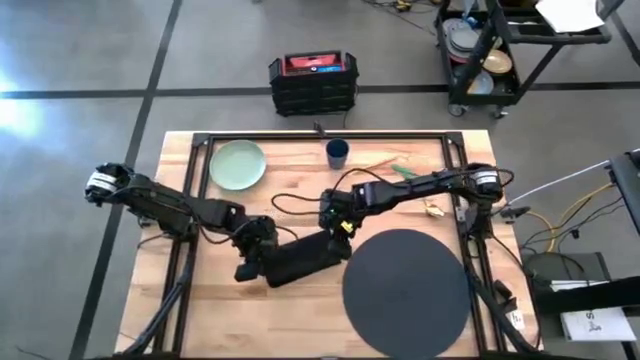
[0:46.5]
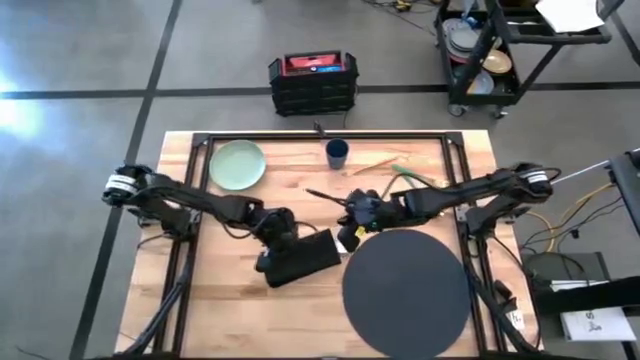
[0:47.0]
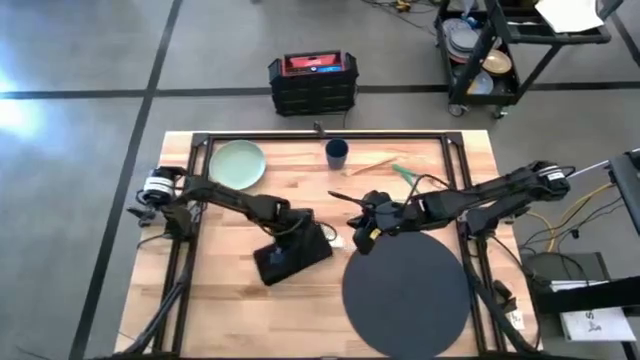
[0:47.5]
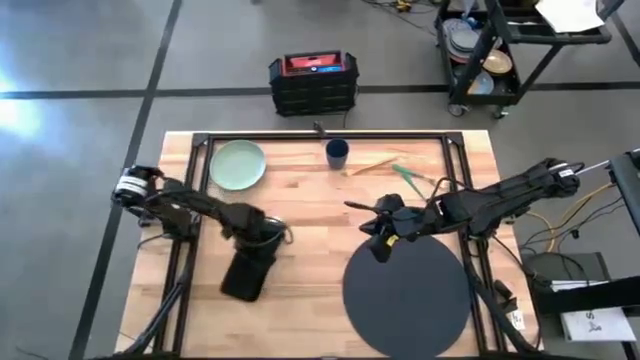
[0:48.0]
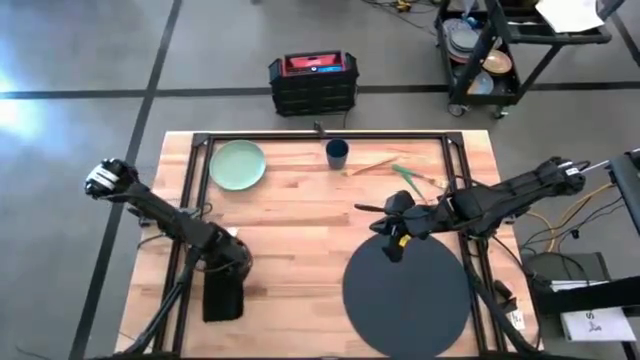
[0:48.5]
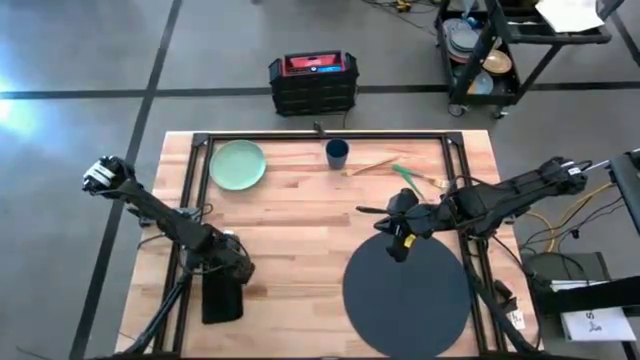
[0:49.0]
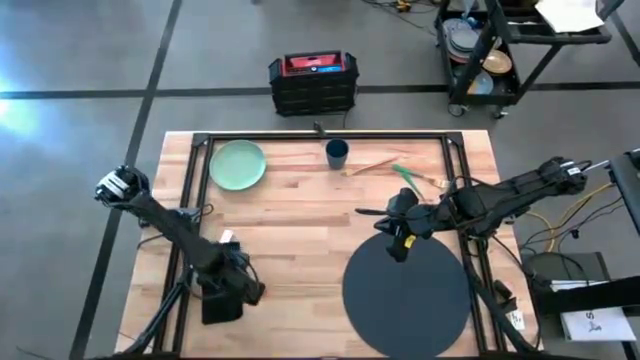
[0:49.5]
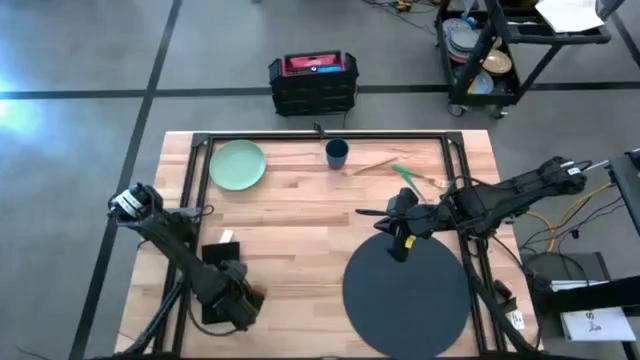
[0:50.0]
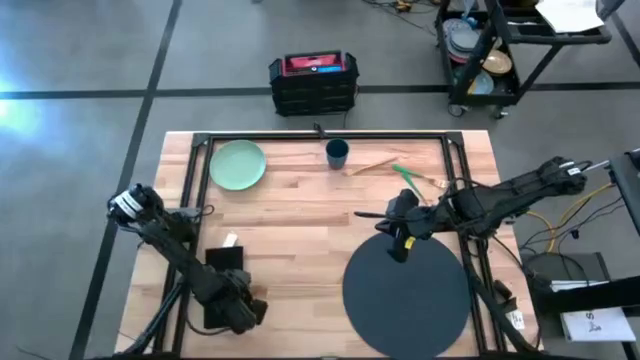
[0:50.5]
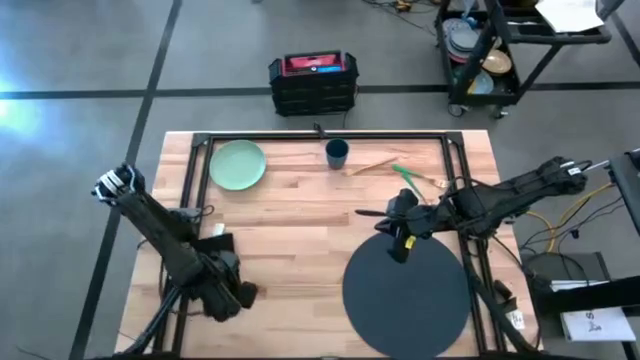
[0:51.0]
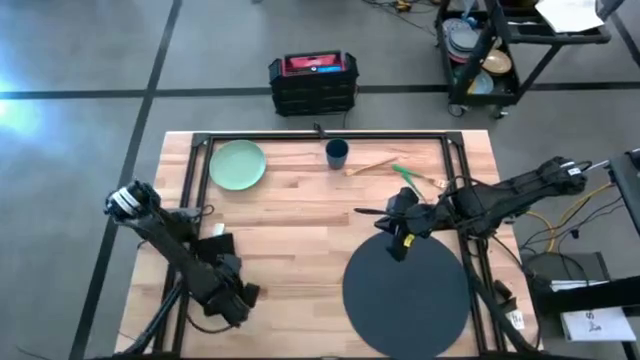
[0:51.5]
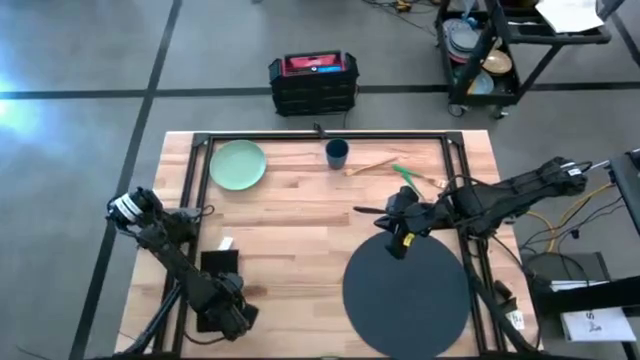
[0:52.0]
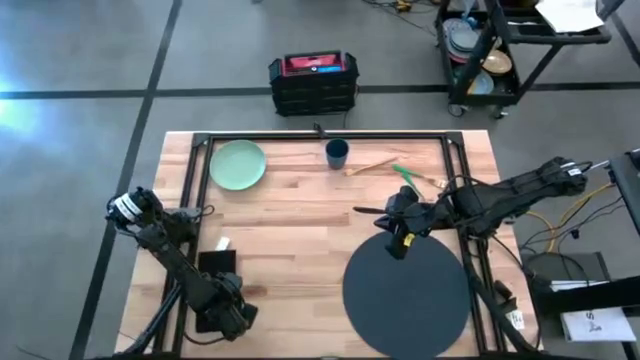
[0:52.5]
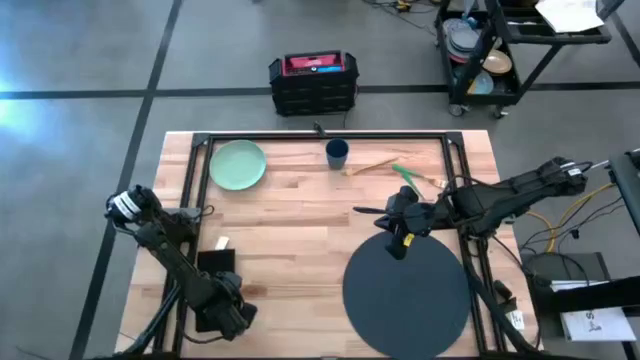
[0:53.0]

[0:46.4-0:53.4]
Task: Set table place
Move the black table napkin to the middle left of the table

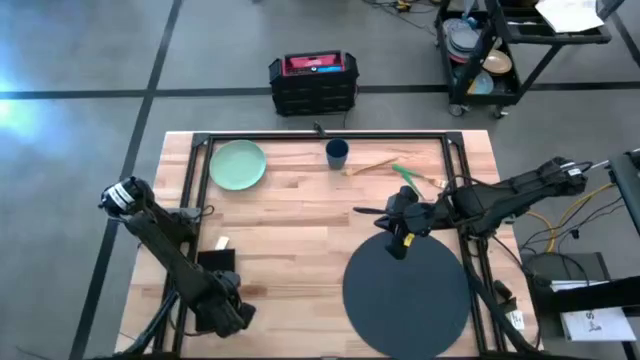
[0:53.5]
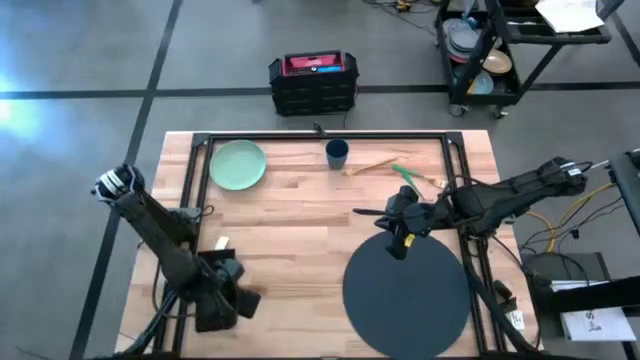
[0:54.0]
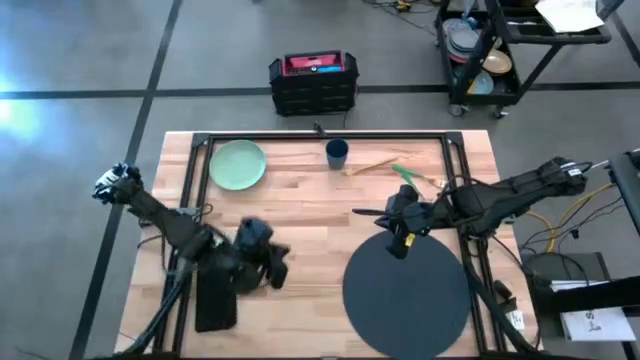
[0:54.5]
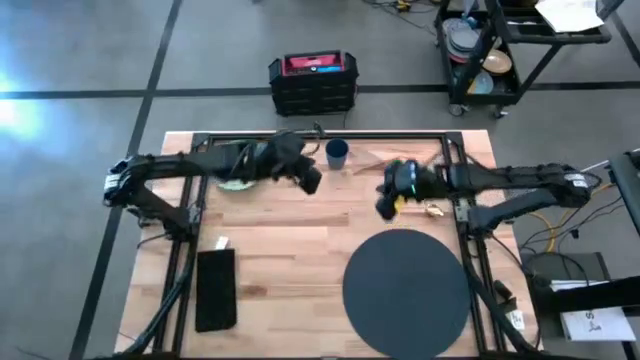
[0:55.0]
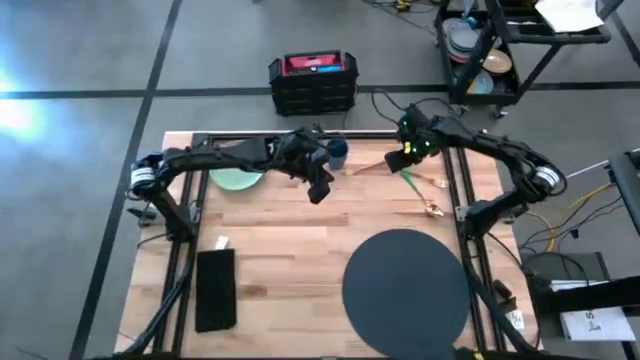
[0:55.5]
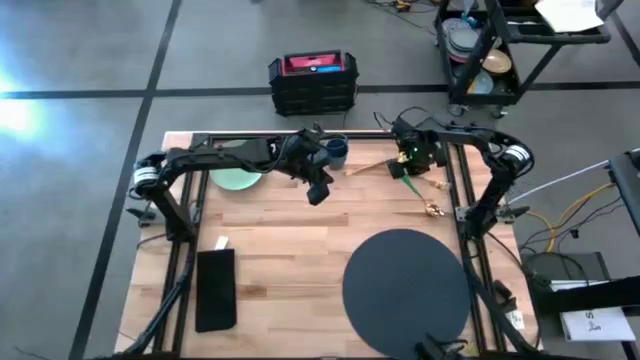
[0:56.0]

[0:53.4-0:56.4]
Put the green fork on the black table napkin

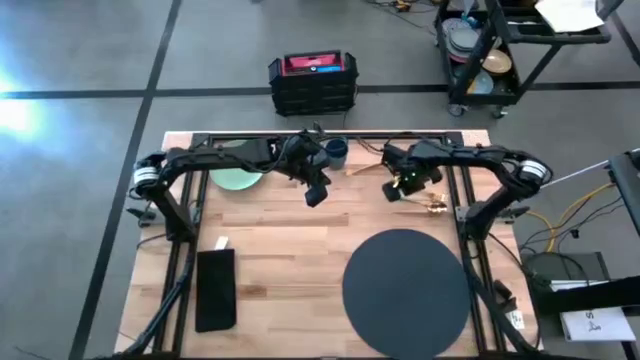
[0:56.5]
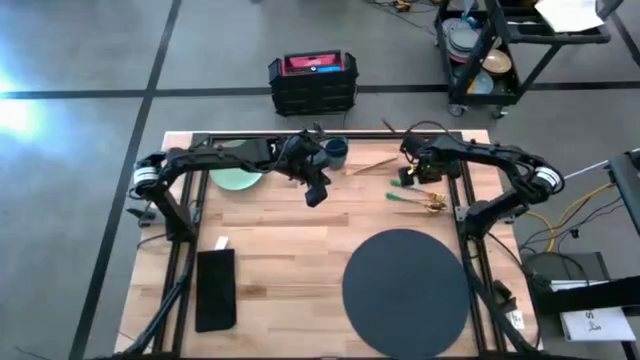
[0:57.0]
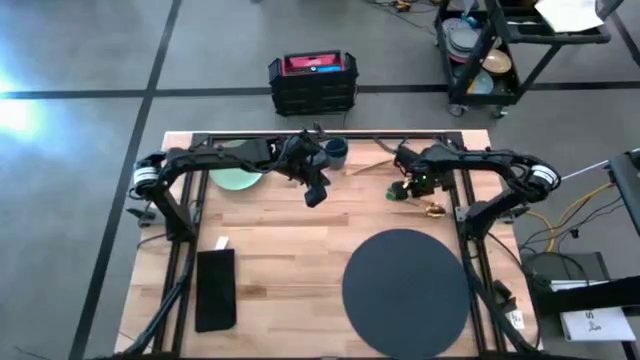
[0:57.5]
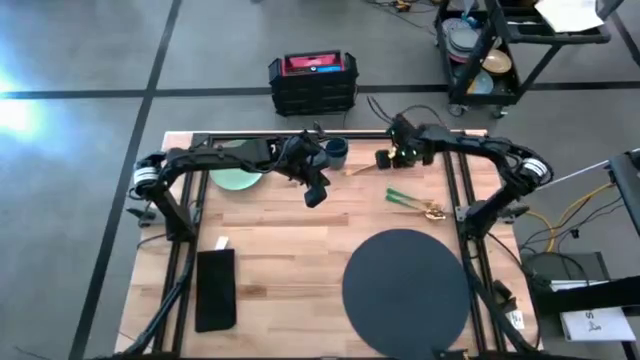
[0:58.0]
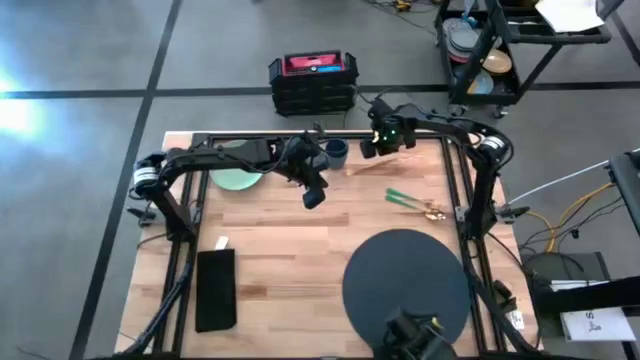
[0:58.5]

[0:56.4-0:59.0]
Adjust the green fork to the top of the black table napkin

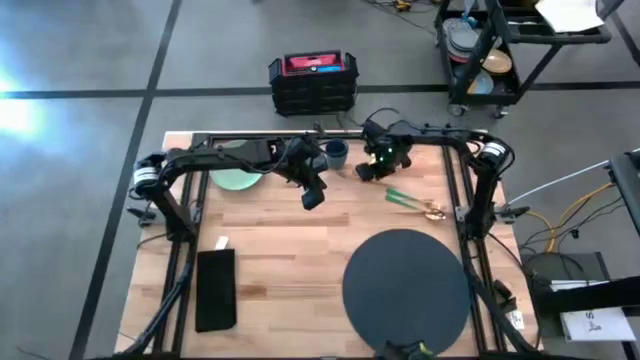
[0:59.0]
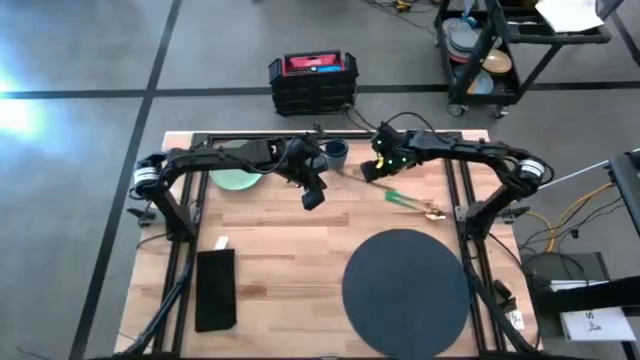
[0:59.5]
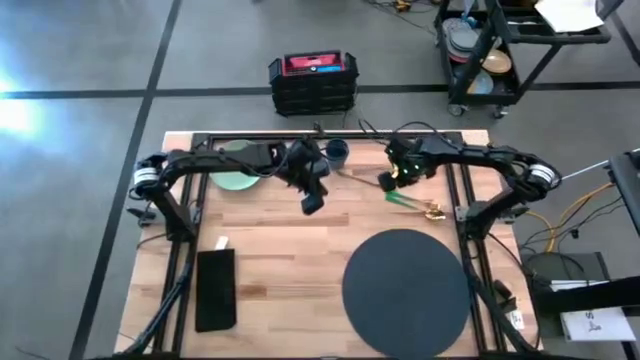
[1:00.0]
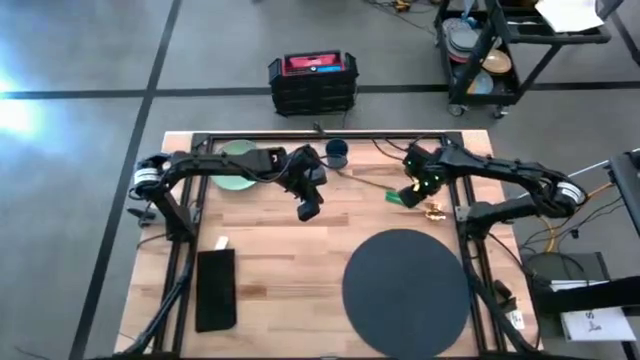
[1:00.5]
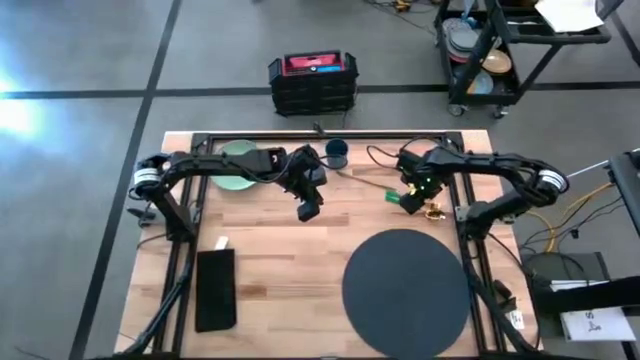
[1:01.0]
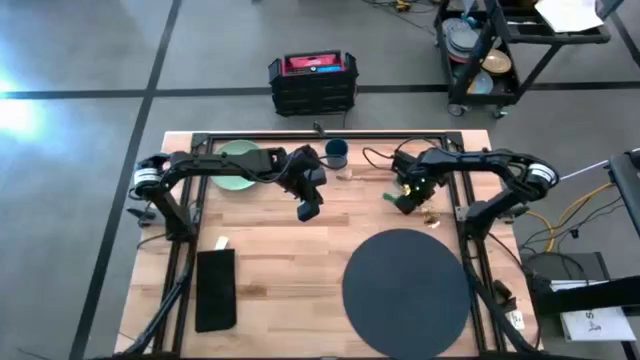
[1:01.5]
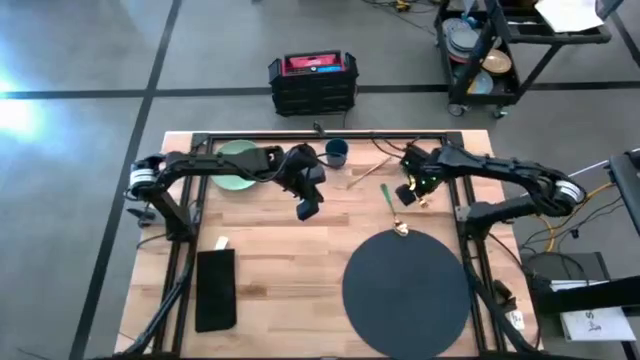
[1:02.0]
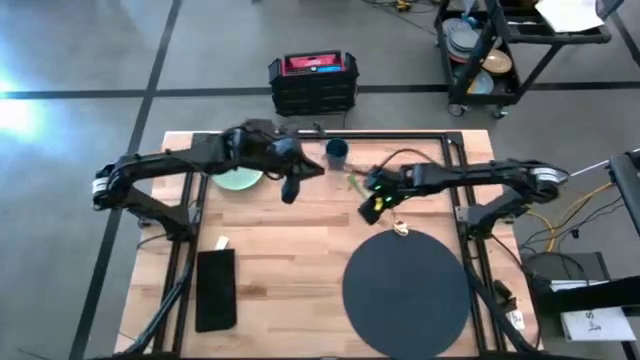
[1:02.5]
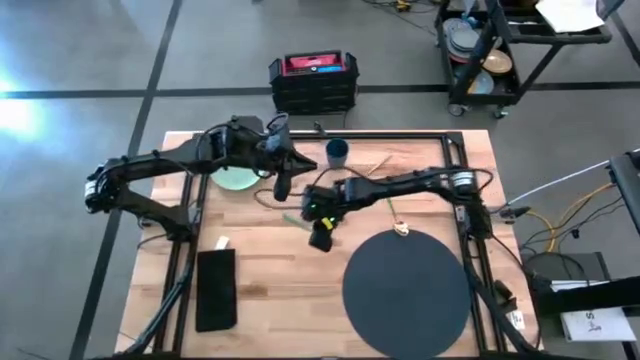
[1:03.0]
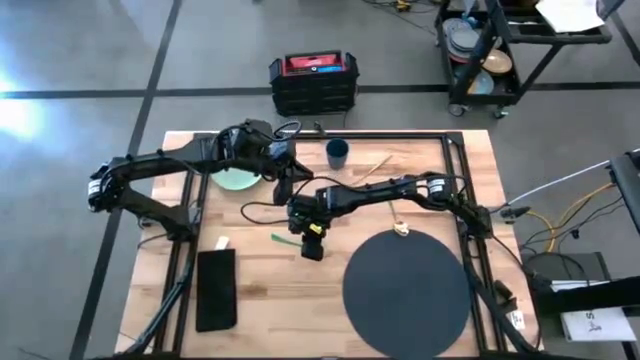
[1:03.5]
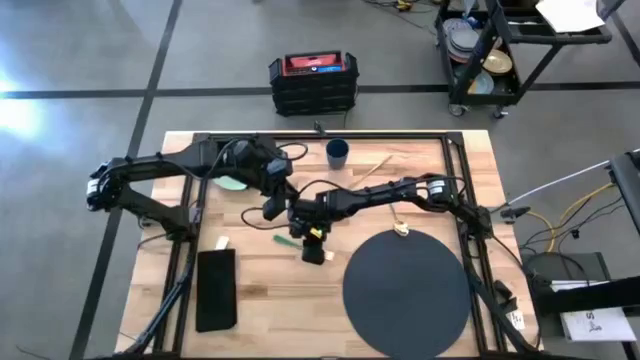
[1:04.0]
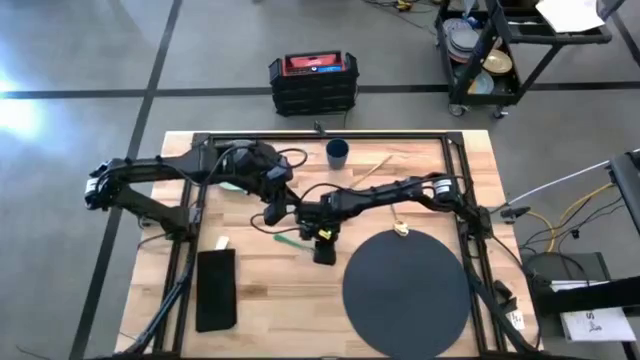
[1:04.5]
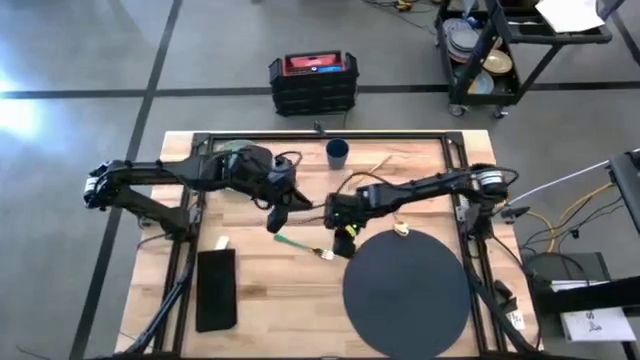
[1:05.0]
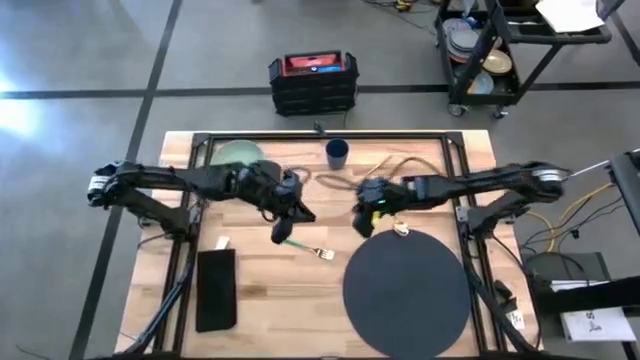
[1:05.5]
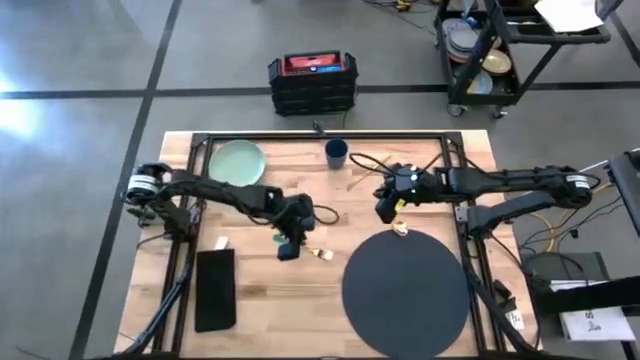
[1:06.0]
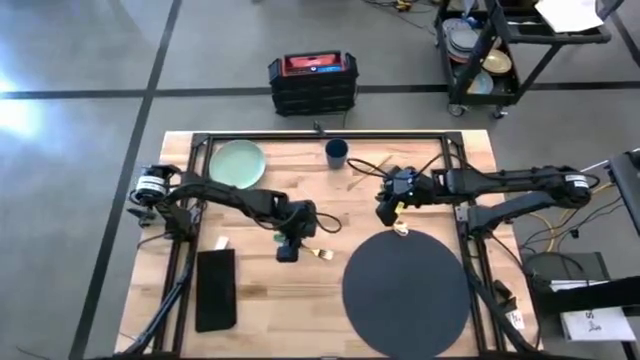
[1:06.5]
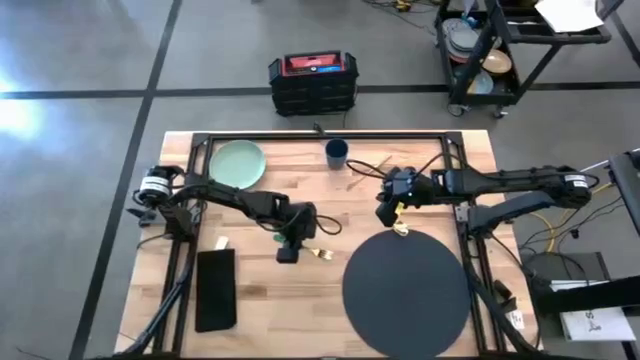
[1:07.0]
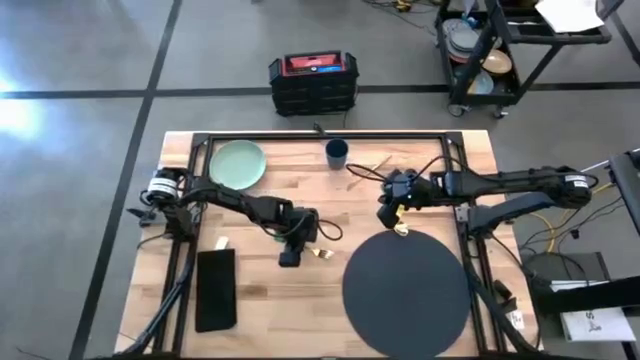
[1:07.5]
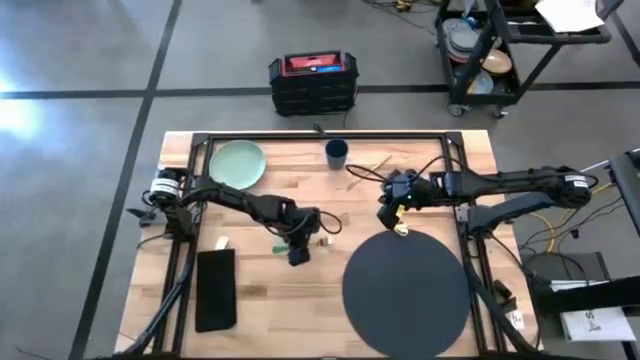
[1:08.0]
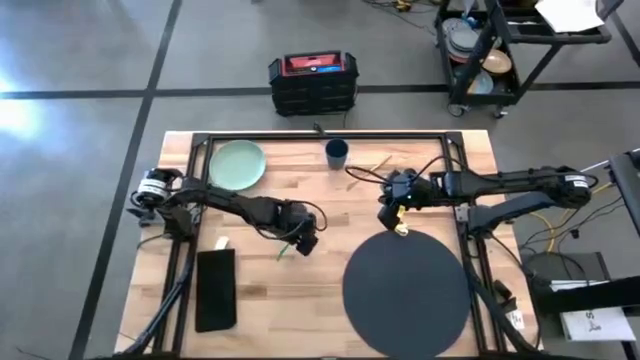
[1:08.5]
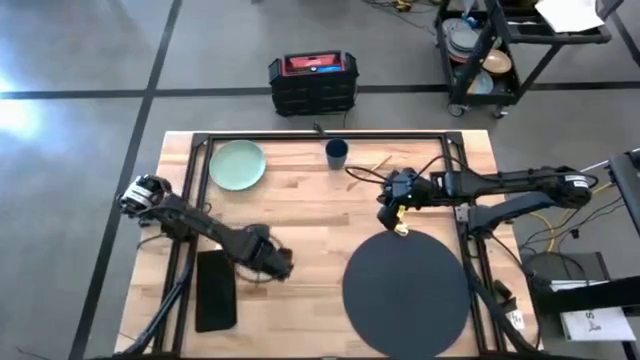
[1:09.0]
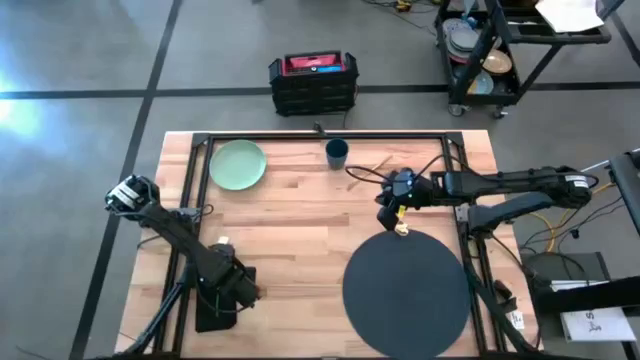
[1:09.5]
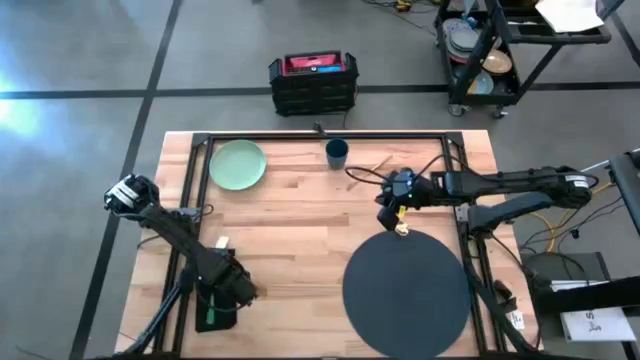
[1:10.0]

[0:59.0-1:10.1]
Adjust the gold knife
